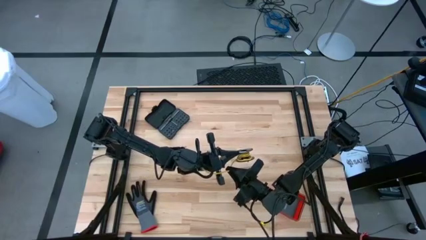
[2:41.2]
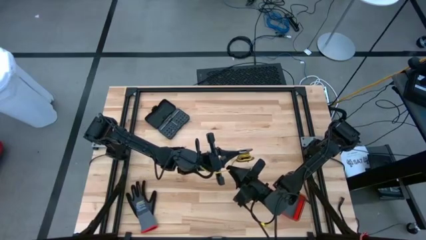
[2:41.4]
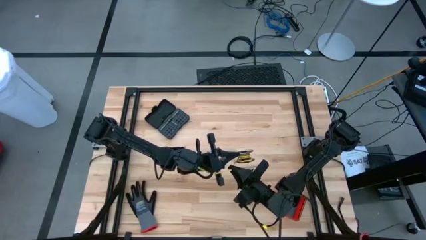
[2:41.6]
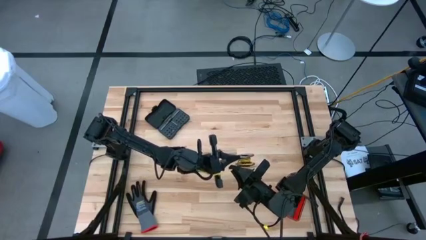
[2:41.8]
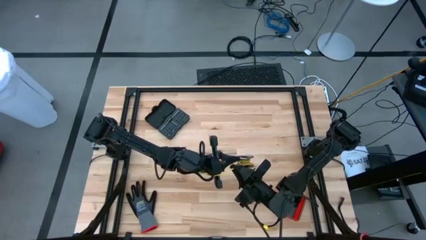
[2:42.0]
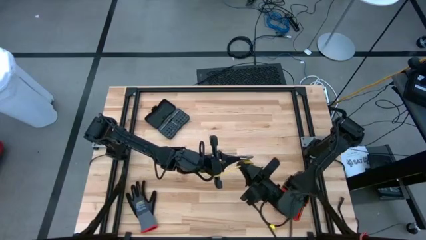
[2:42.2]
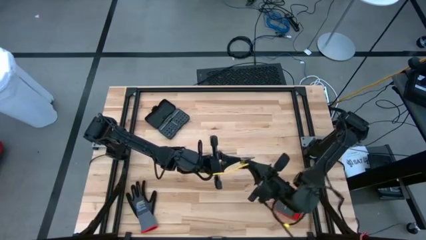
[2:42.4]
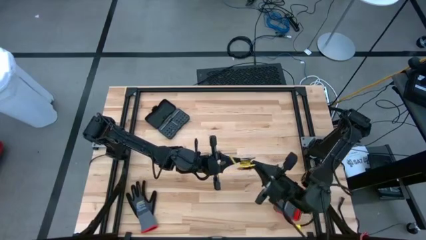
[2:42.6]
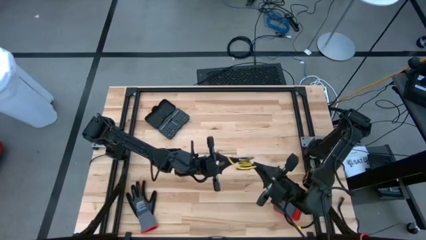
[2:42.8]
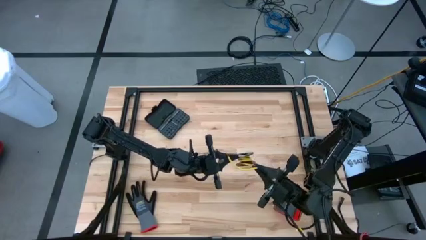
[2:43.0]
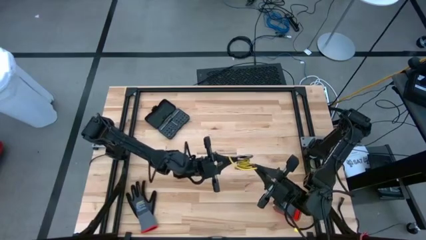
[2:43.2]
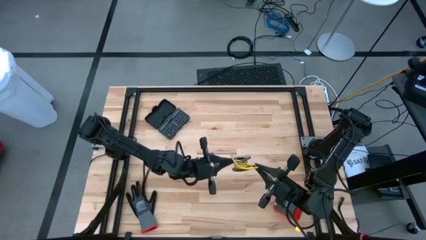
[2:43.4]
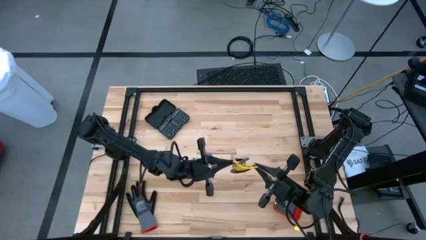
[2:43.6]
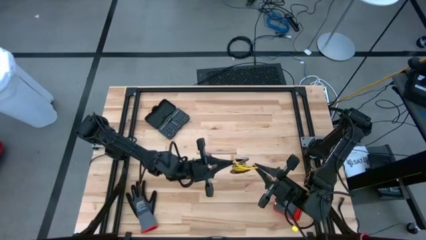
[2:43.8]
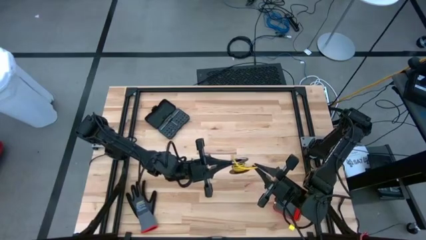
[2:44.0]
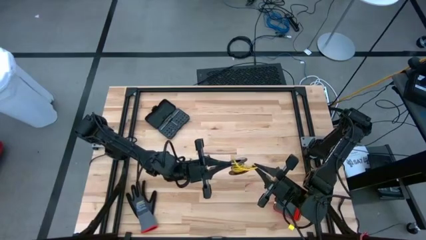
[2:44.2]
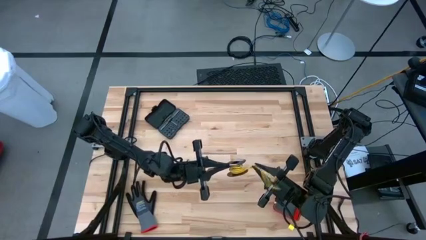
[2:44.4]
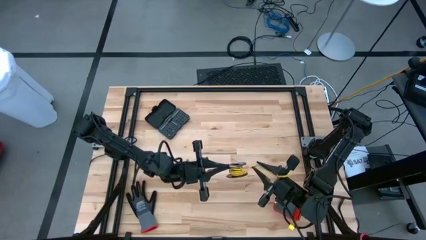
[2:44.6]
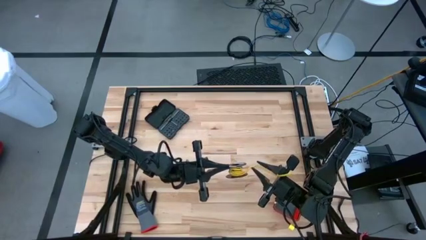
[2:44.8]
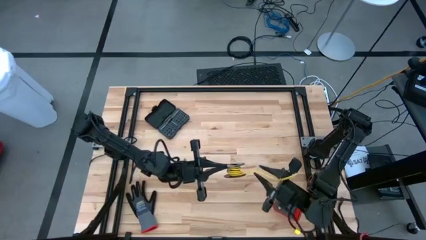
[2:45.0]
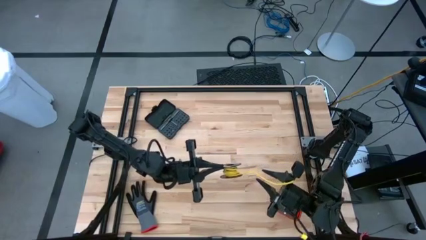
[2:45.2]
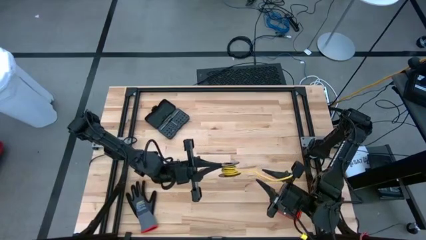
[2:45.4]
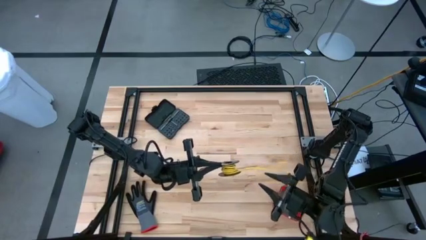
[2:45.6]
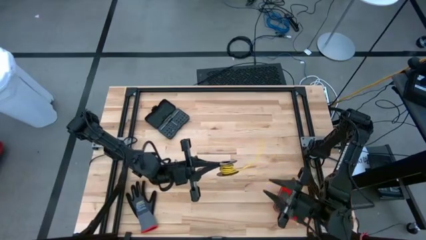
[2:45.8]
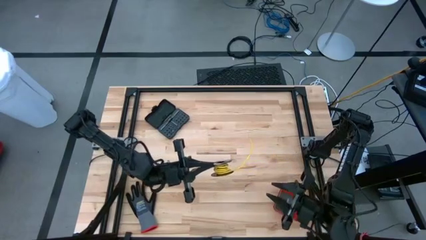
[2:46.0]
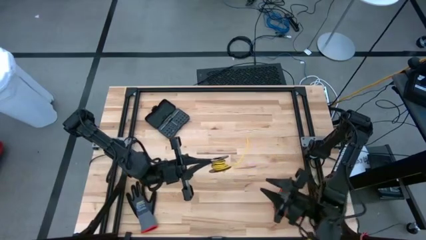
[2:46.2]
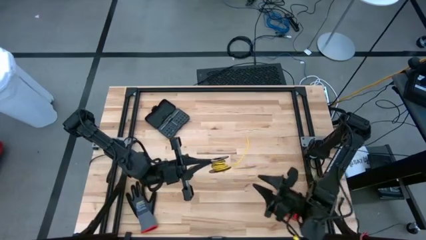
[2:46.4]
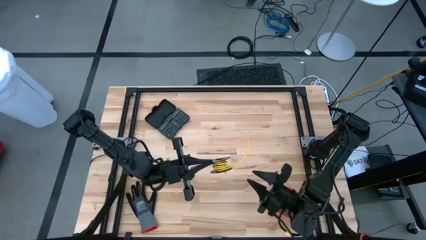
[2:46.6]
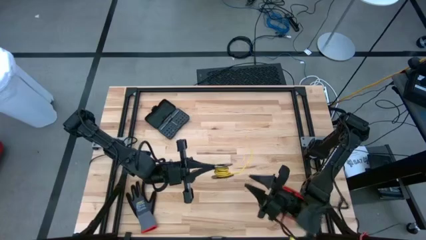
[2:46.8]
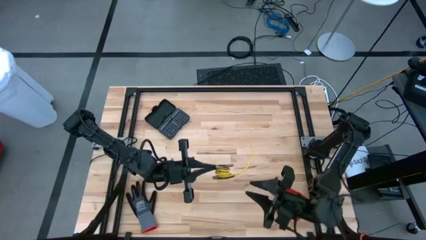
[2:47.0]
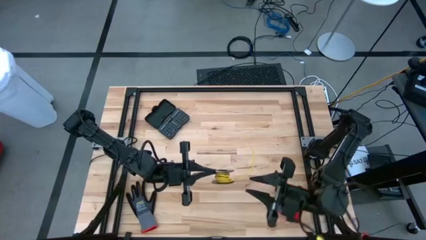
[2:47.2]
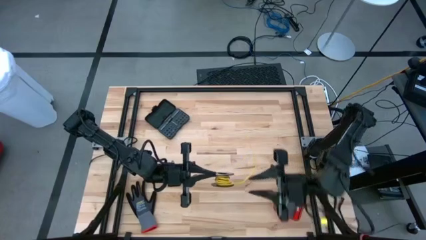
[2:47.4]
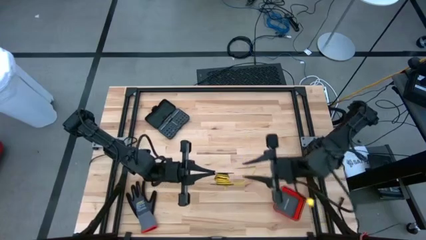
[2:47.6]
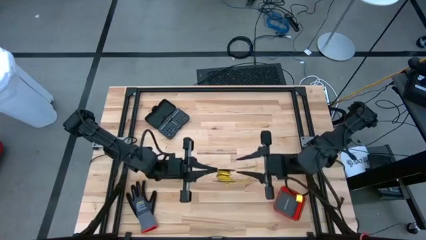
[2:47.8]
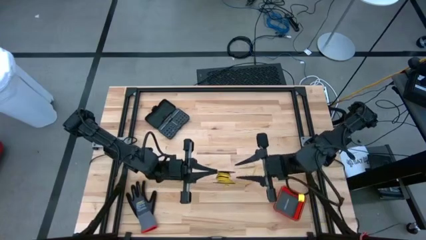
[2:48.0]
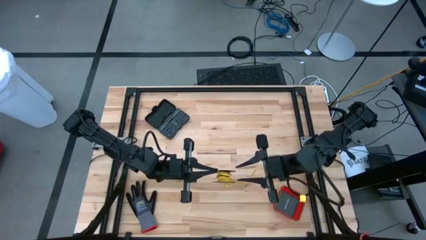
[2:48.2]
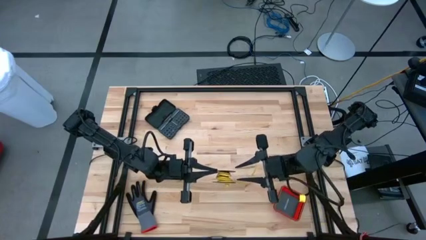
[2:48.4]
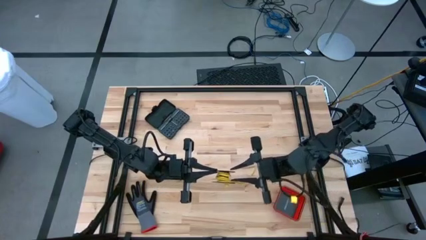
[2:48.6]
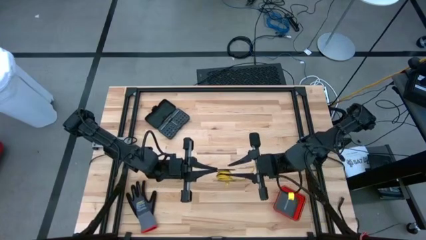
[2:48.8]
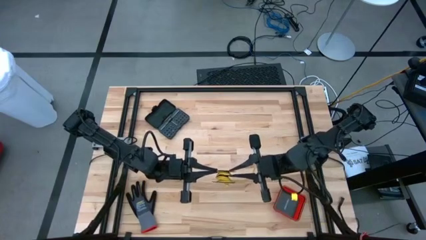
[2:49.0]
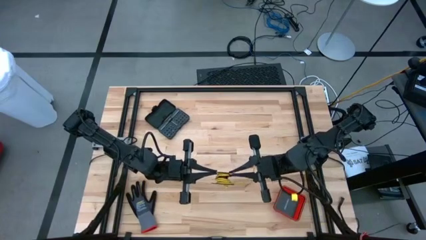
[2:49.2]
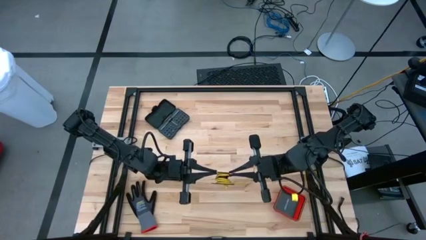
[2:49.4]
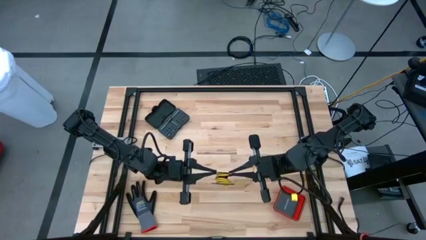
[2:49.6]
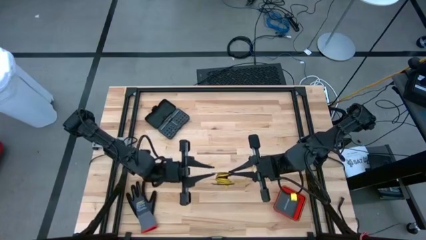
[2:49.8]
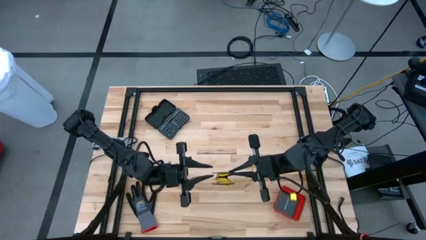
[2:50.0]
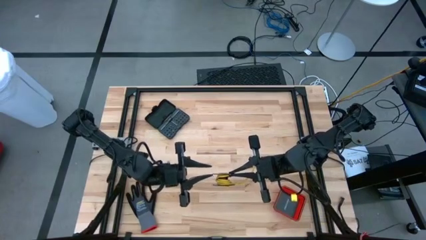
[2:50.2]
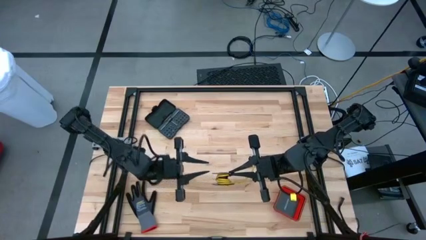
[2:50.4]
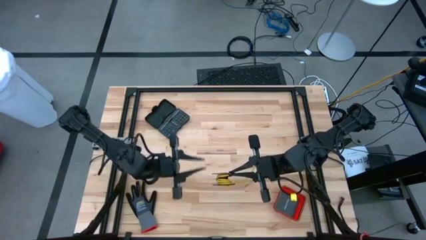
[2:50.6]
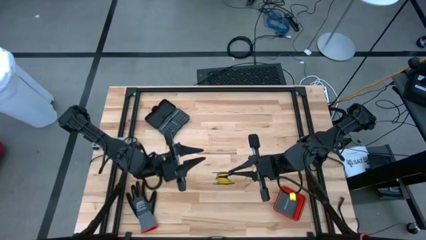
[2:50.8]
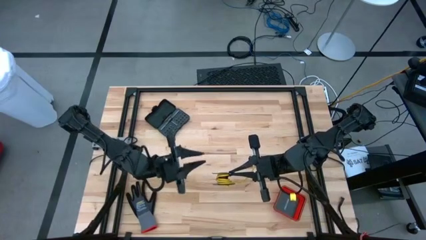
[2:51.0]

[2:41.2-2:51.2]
Task: Coil cords
Coil the yellow wire onto the spool

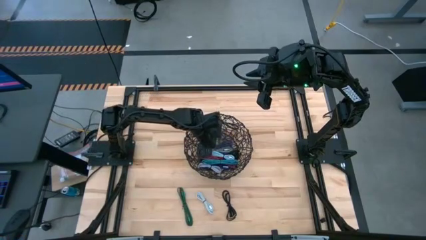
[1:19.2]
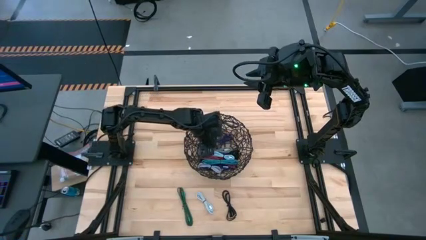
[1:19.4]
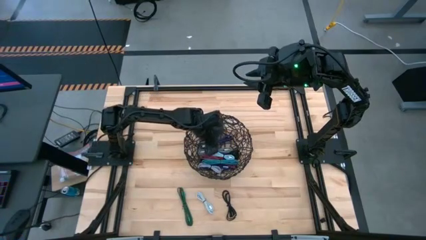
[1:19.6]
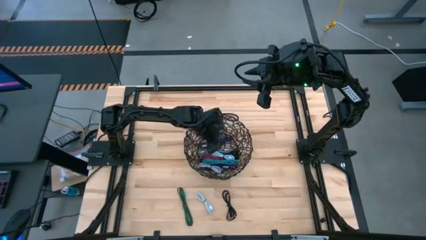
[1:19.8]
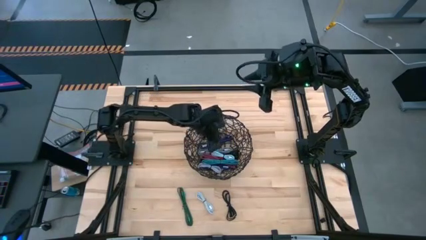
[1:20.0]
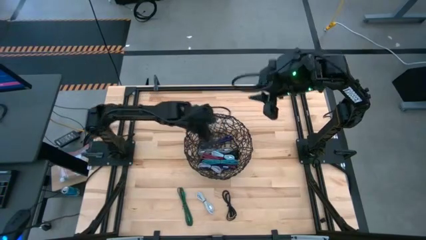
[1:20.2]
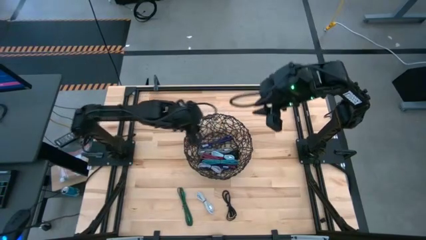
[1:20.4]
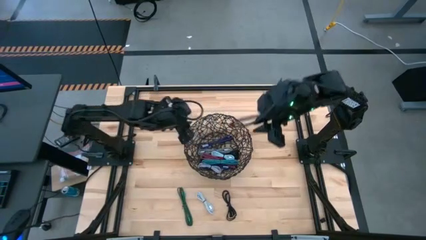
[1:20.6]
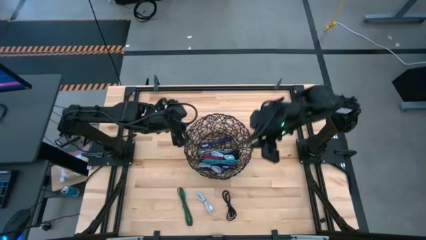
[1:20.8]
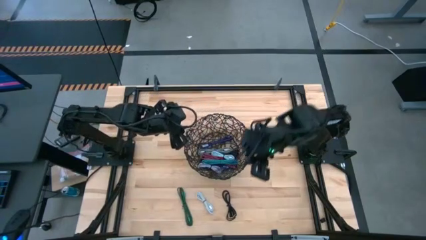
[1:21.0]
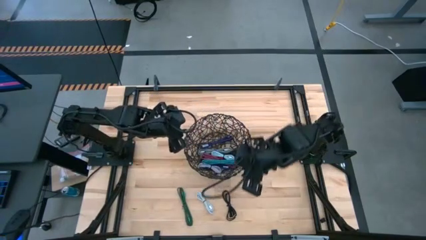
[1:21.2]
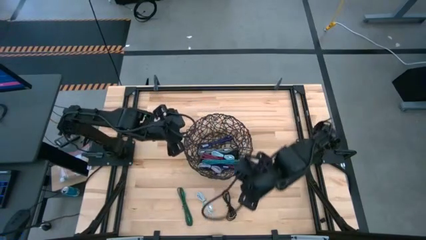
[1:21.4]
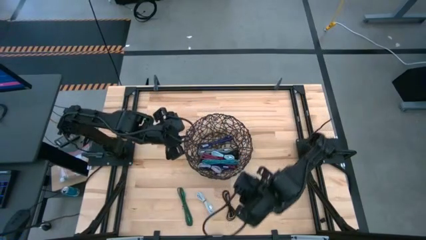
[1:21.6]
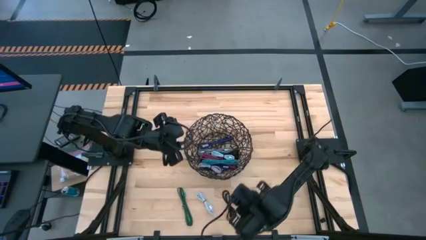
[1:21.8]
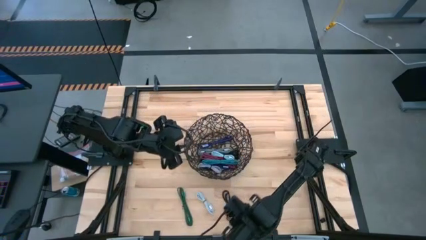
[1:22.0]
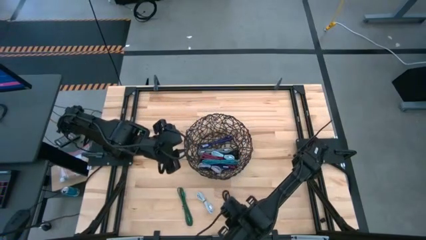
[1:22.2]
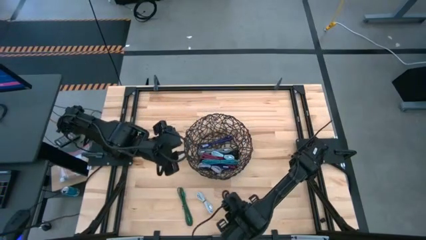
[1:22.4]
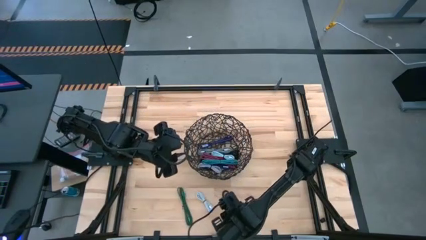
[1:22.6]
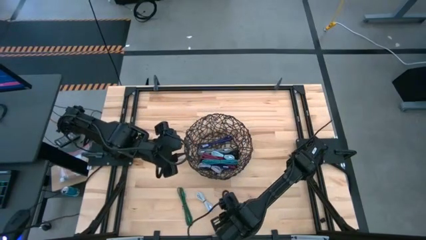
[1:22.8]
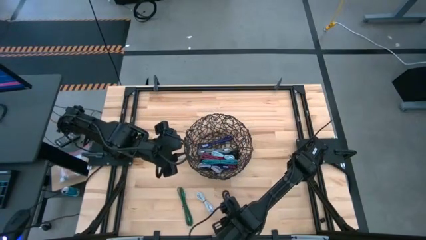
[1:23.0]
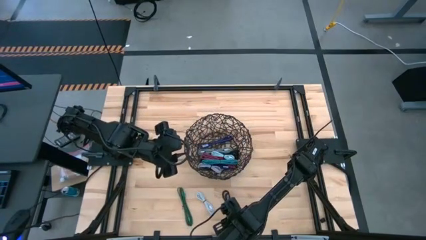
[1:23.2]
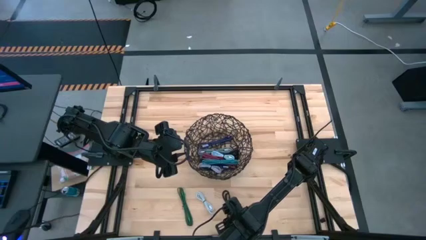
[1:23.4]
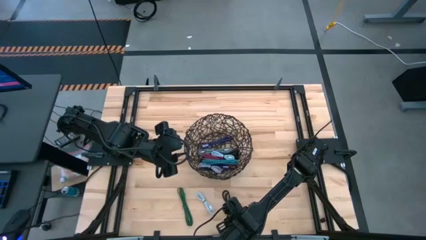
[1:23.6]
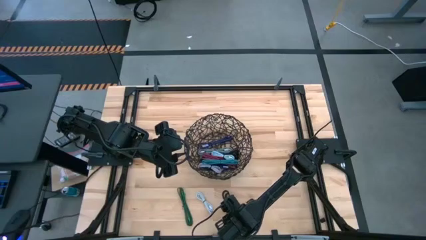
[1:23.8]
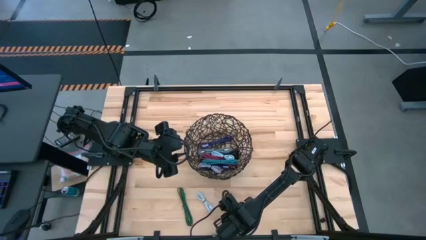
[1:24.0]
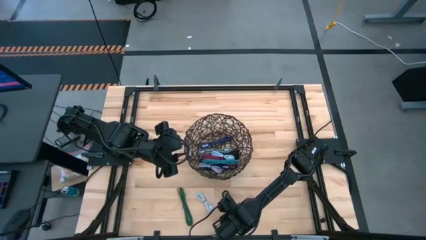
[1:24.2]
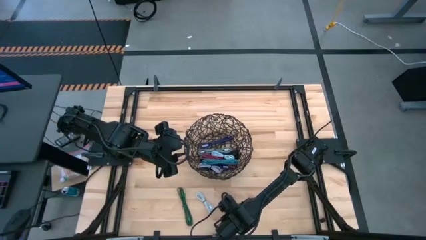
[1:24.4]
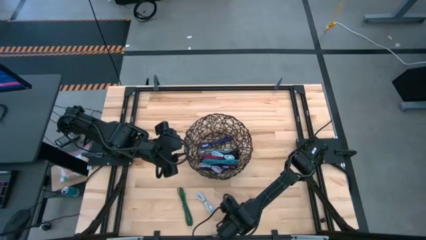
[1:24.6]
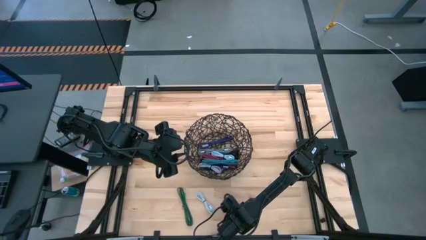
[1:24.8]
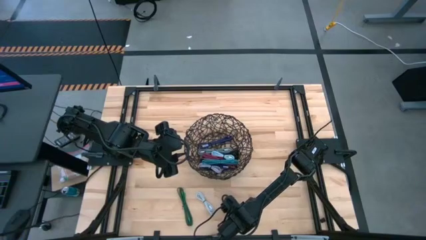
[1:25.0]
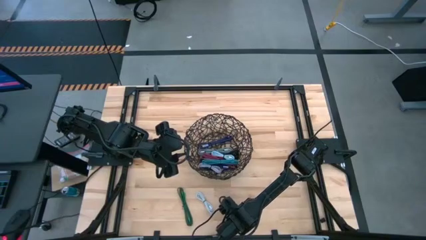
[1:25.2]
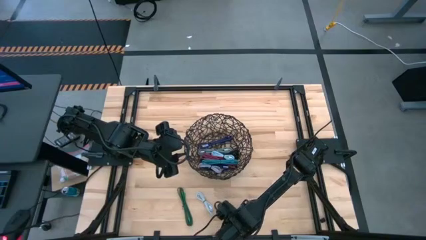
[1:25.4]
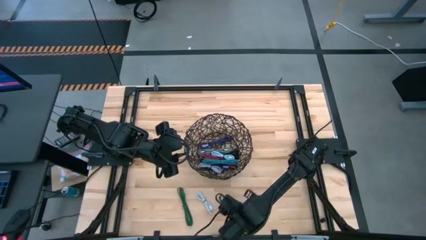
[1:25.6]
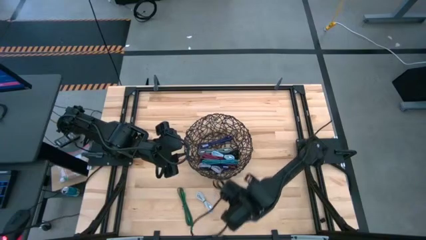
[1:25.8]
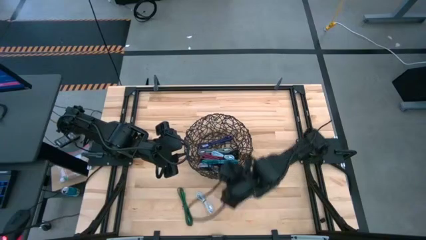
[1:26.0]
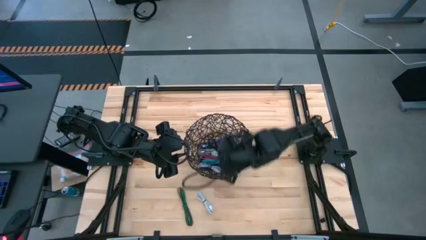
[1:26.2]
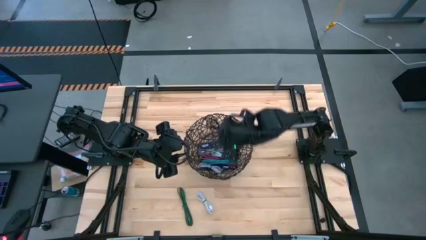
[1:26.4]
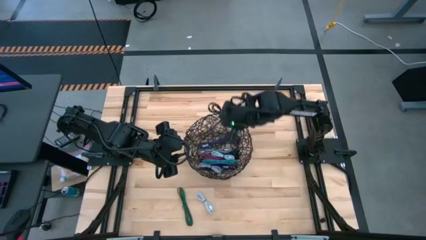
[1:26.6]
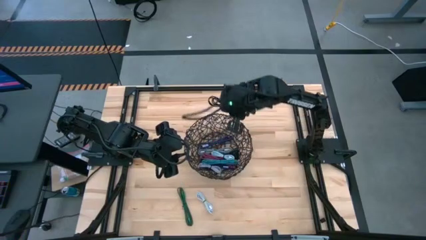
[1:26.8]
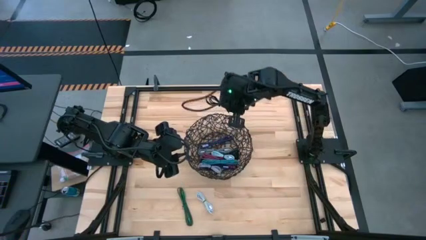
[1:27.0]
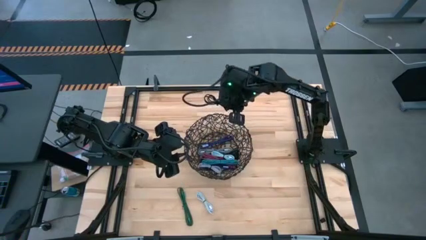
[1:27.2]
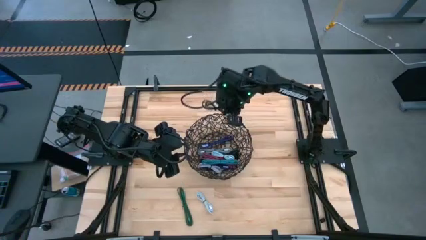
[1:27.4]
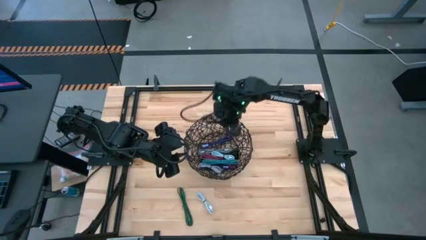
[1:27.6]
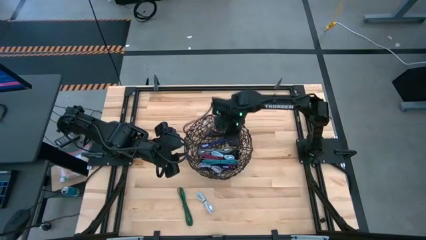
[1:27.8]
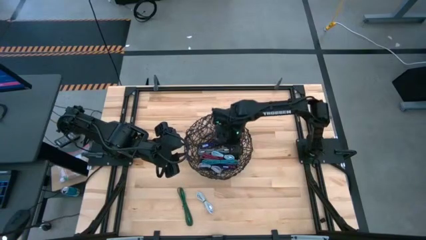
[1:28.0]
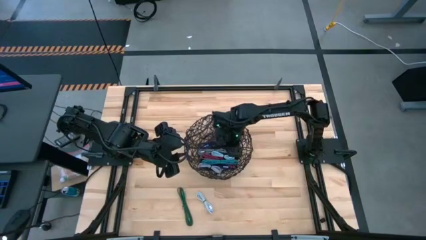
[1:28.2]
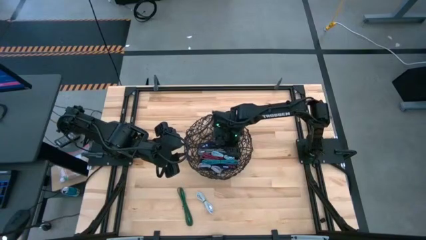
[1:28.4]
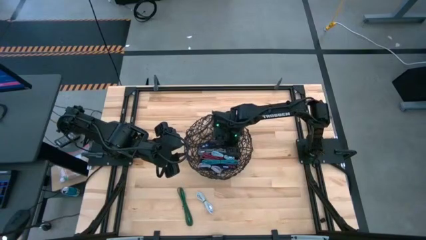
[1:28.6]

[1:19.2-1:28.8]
Task: Pick and place USB-C Cables
Put the black charger cable into the black mesh basket
